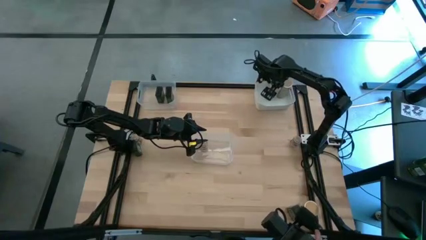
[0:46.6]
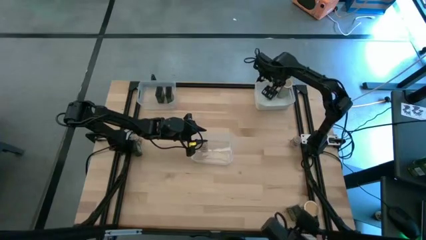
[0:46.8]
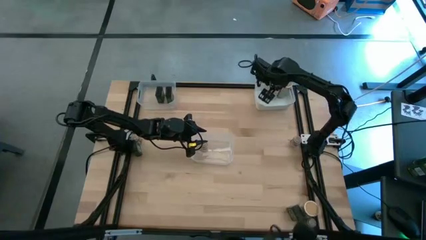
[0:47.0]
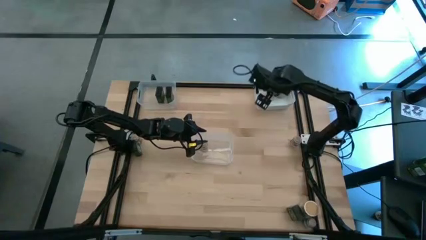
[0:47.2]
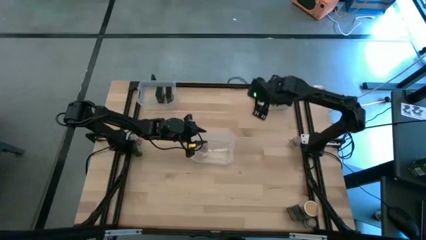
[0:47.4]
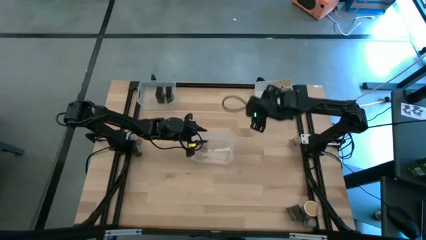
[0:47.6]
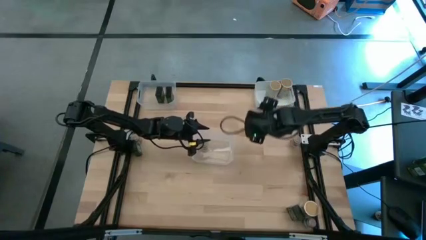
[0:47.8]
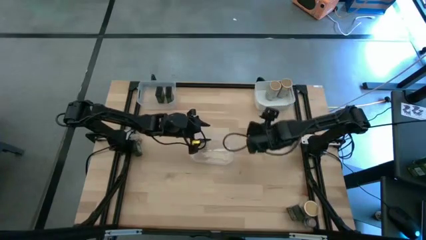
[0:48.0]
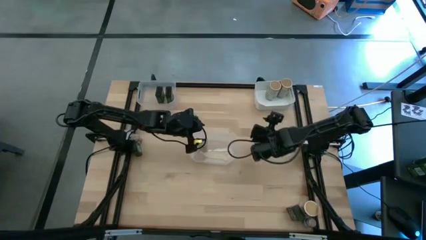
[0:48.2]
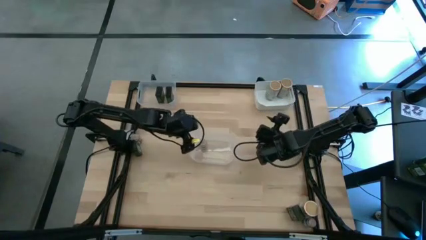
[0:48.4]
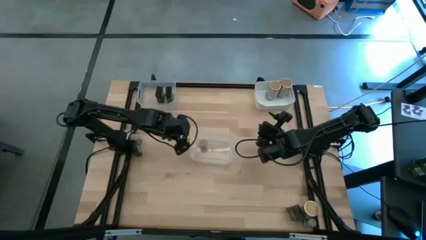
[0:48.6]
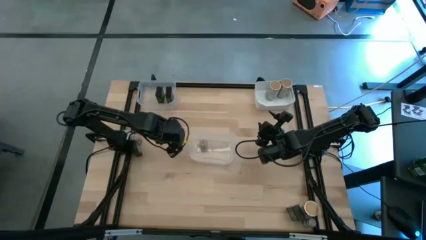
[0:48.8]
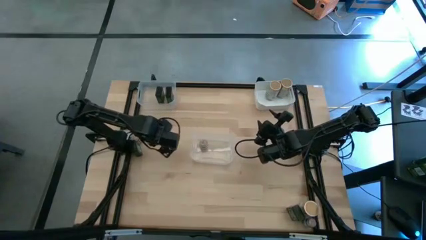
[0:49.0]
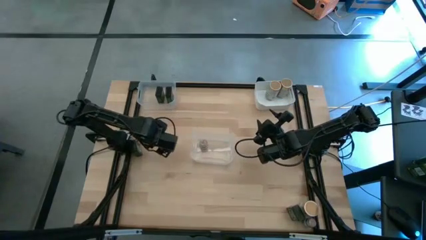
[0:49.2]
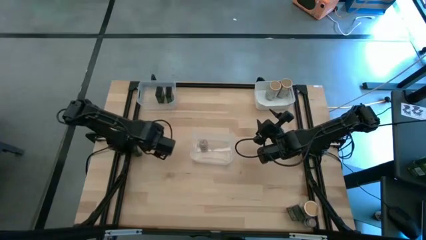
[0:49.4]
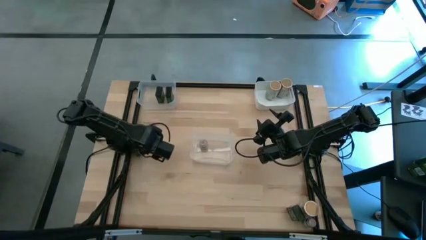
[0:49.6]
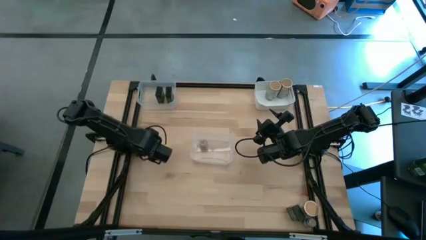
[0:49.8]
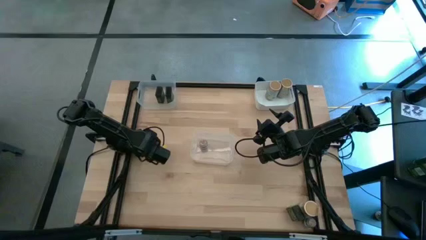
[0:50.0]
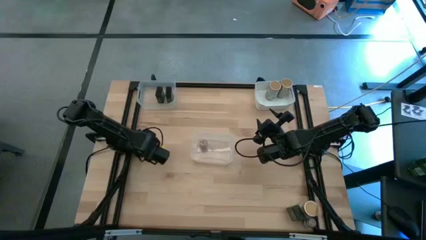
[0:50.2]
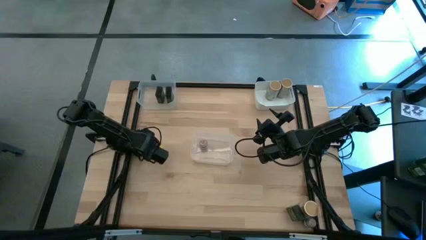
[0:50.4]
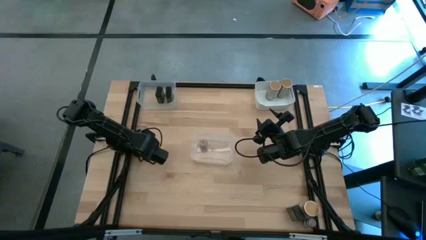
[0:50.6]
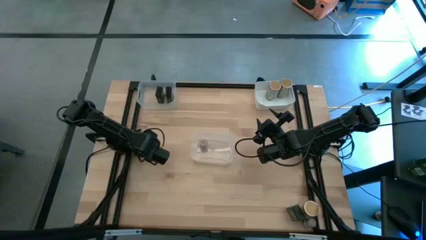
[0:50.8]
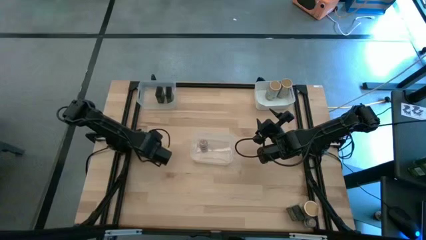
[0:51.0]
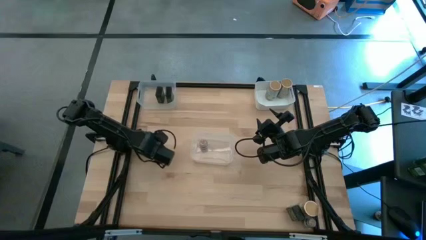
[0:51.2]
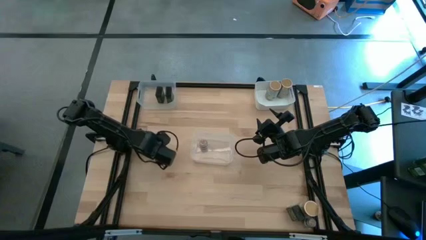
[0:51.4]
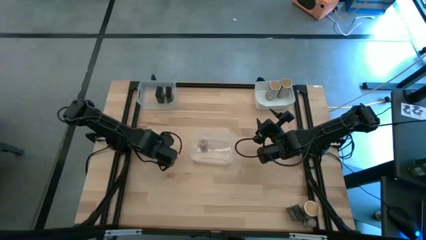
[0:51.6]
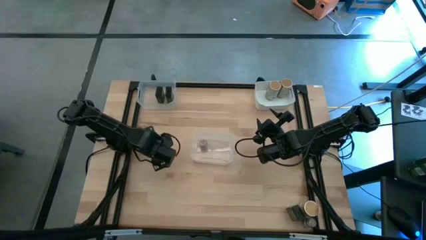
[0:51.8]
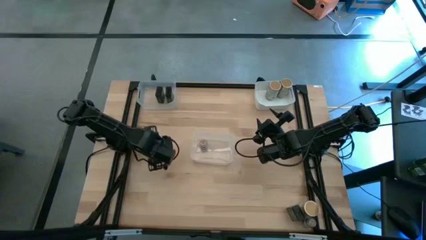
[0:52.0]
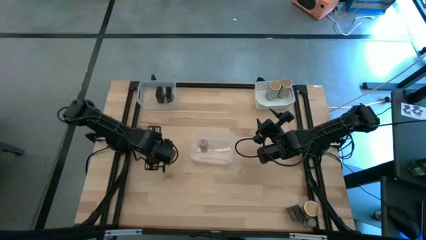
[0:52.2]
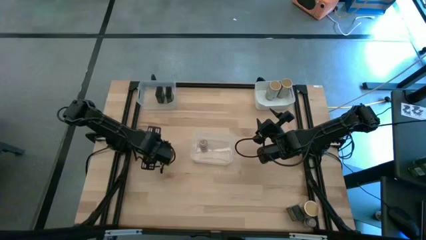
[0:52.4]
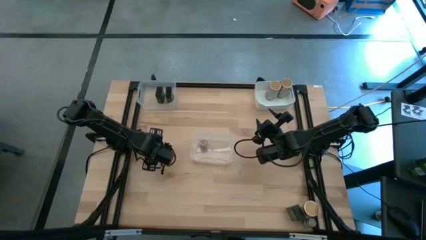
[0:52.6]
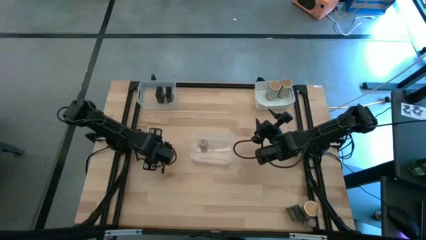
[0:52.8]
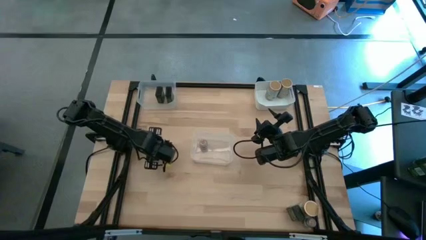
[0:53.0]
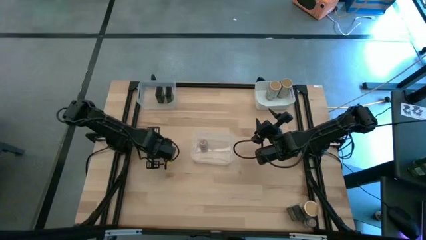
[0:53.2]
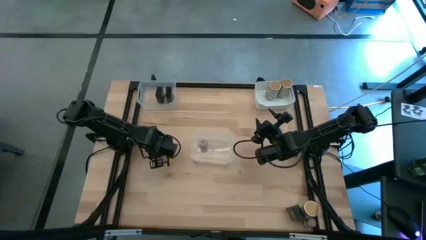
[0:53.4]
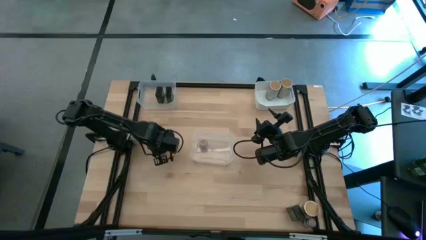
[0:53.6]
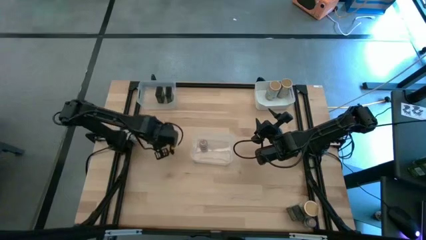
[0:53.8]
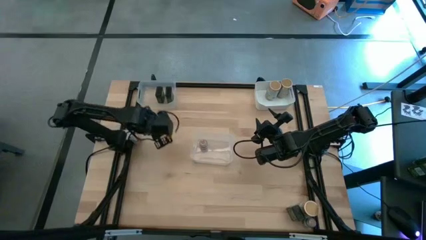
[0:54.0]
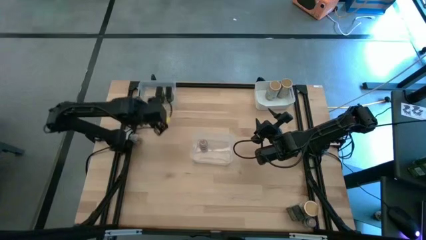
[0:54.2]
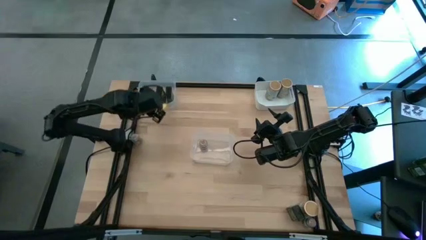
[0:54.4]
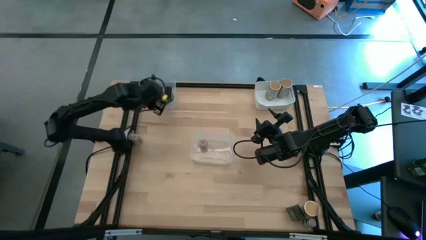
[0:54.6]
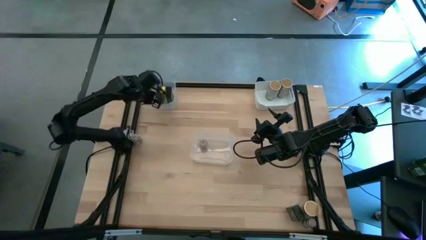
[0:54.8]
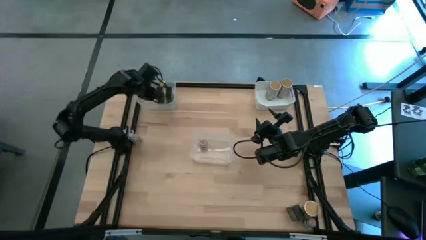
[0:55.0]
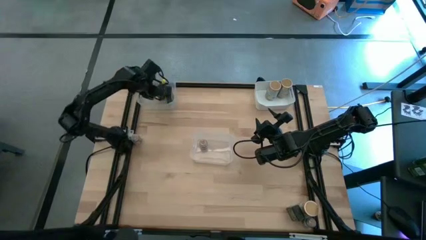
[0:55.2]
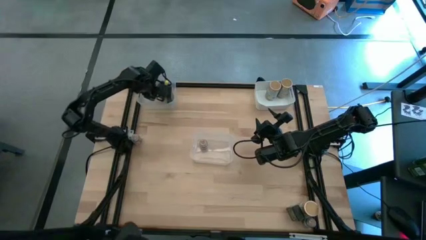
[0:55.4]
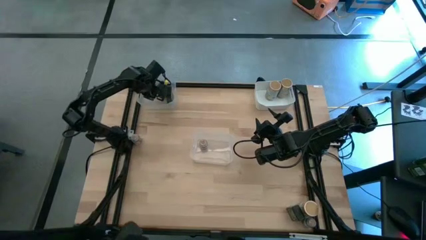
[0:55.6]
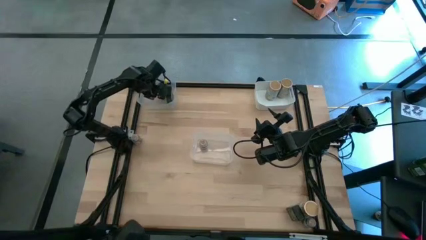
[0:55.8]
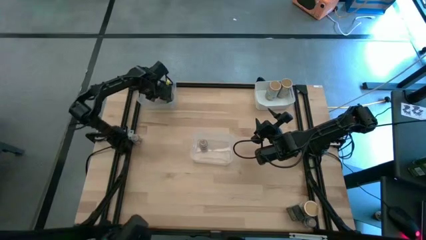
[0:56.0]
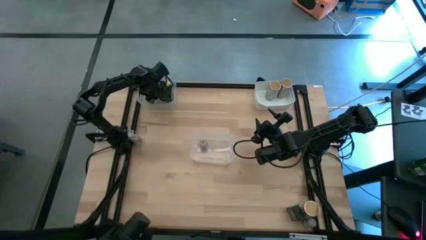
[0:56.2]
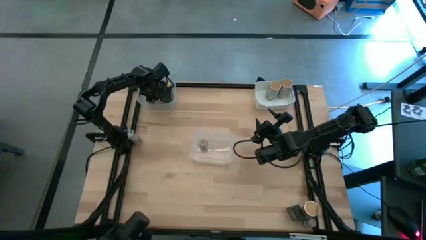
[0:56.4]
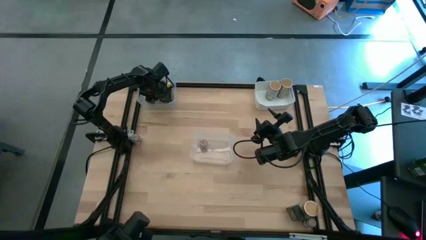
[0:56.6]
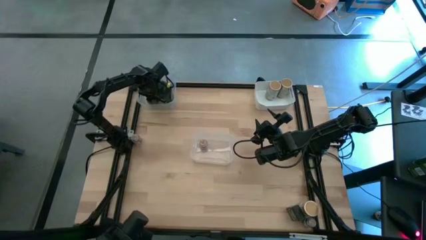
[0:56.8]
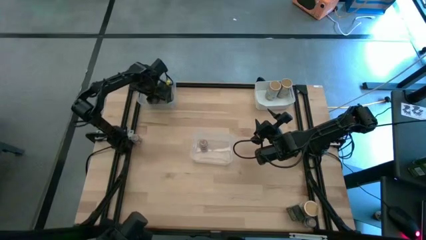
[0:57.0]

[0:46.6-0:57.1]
Task: Sort spices by type
Put the black seasoning can into the top transparent bin
